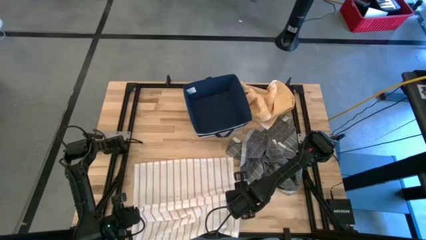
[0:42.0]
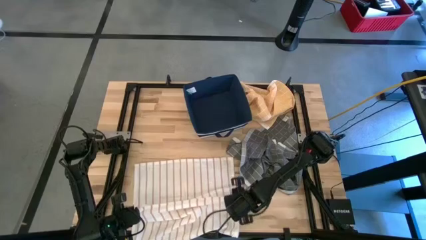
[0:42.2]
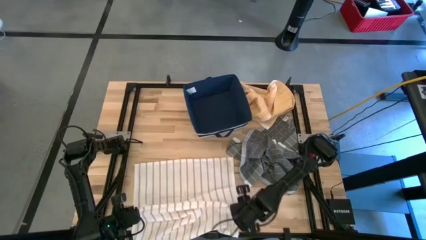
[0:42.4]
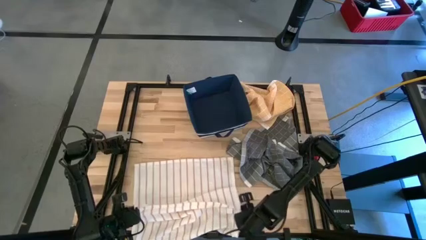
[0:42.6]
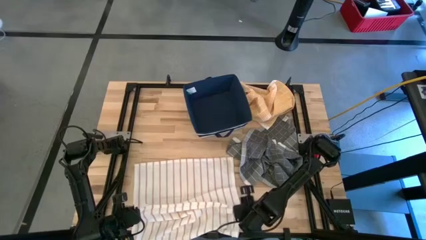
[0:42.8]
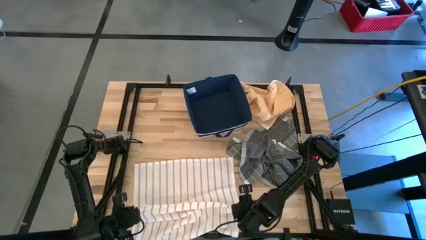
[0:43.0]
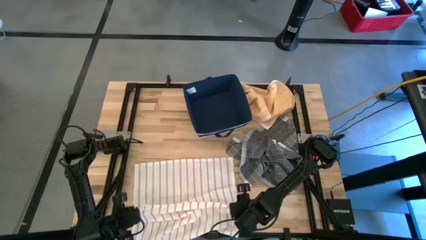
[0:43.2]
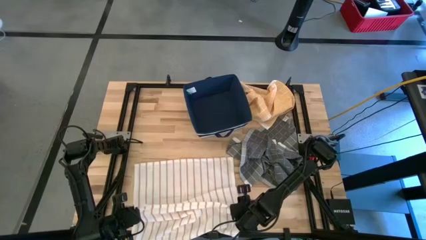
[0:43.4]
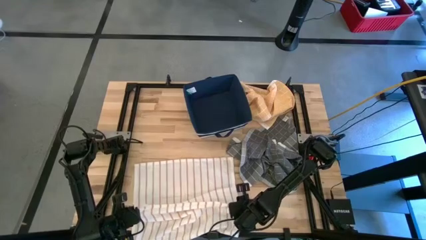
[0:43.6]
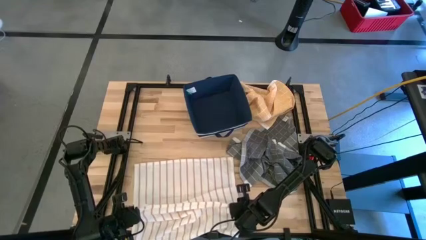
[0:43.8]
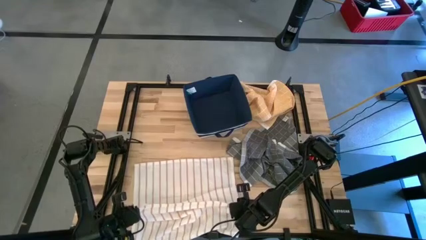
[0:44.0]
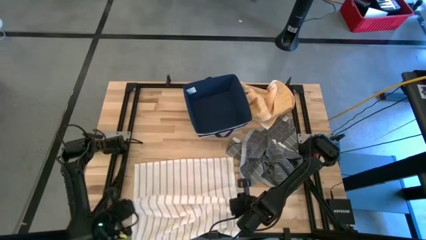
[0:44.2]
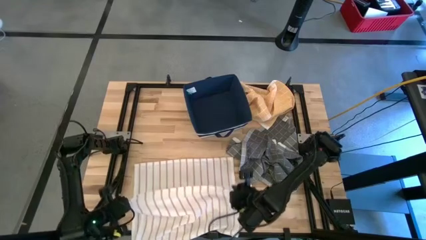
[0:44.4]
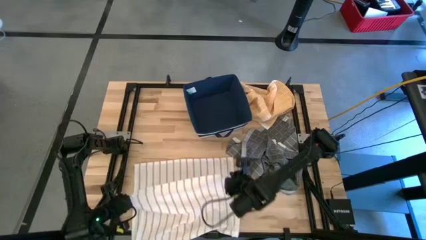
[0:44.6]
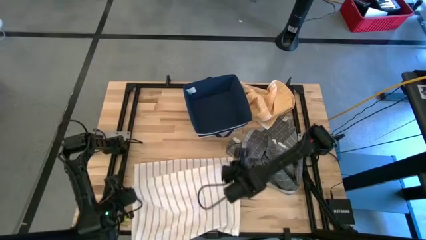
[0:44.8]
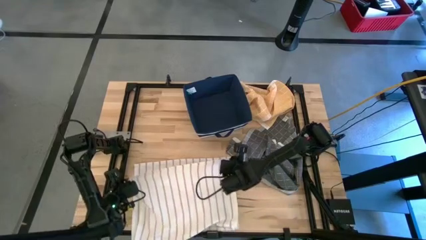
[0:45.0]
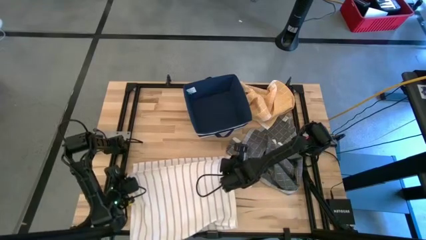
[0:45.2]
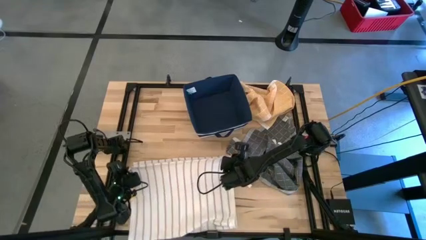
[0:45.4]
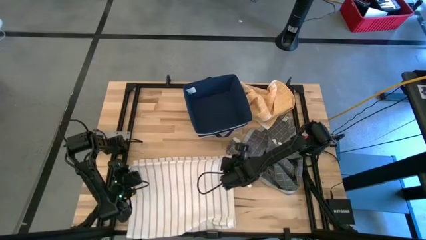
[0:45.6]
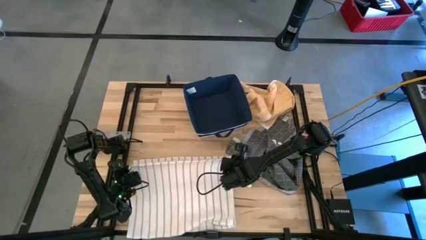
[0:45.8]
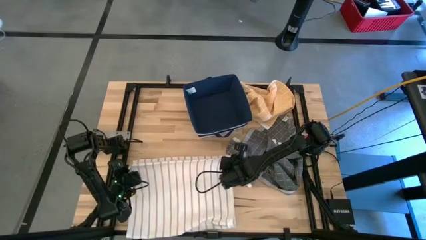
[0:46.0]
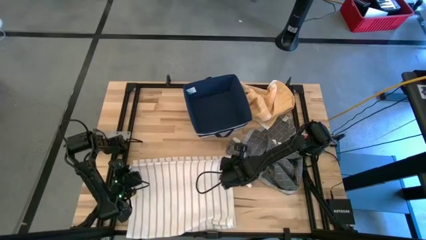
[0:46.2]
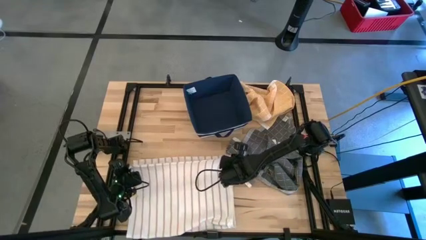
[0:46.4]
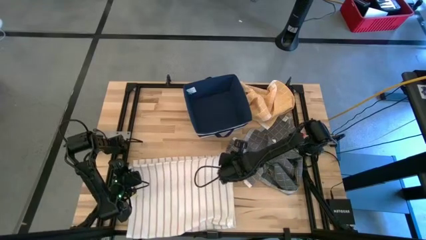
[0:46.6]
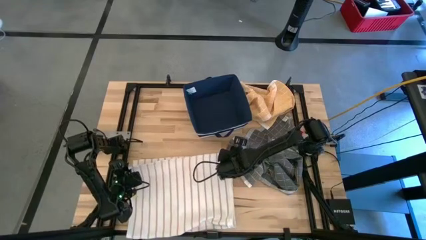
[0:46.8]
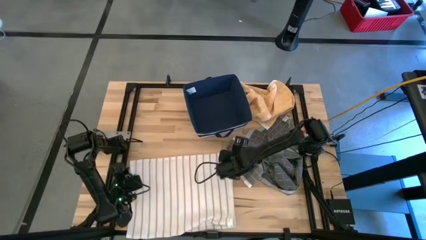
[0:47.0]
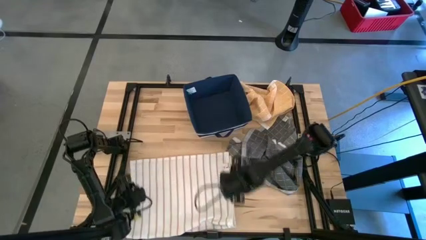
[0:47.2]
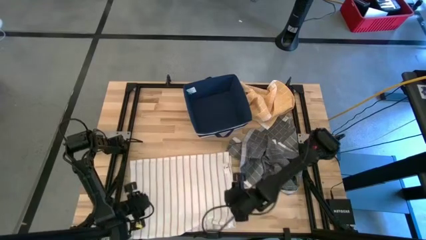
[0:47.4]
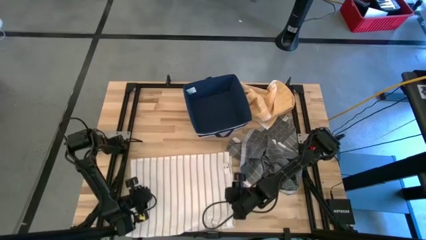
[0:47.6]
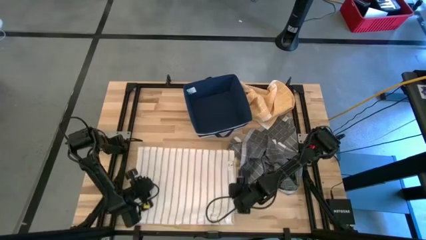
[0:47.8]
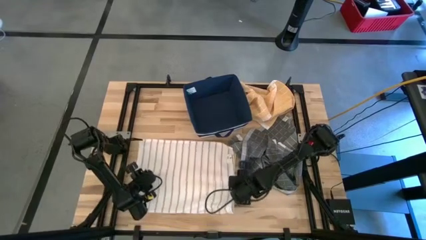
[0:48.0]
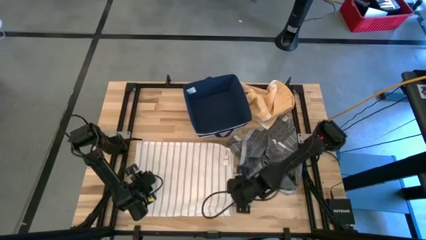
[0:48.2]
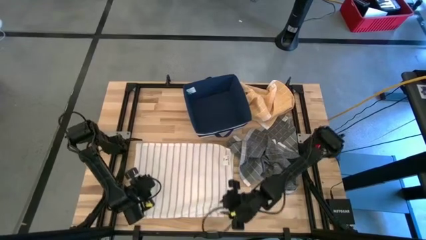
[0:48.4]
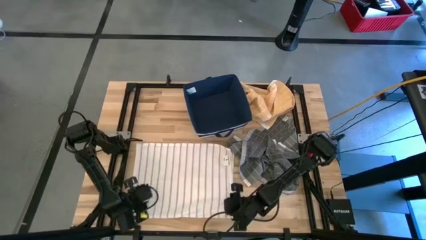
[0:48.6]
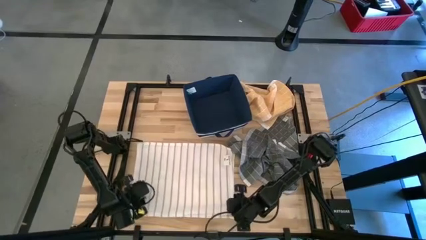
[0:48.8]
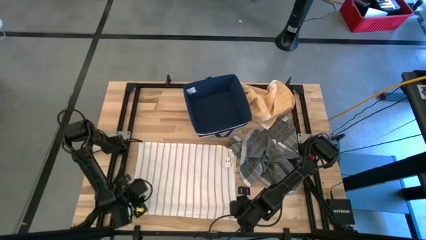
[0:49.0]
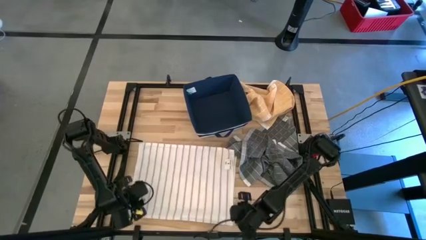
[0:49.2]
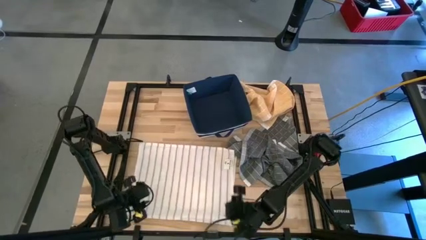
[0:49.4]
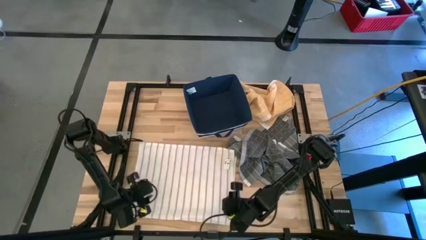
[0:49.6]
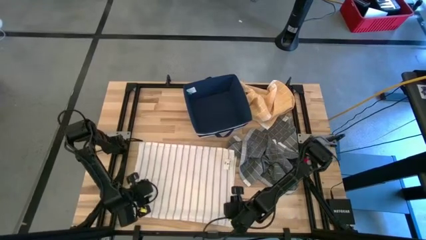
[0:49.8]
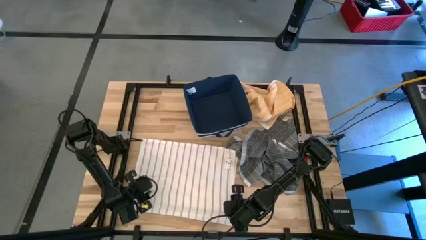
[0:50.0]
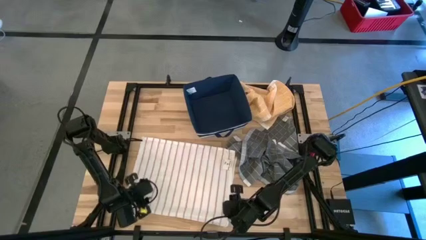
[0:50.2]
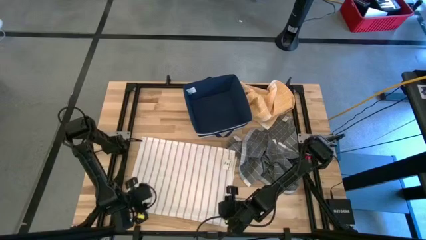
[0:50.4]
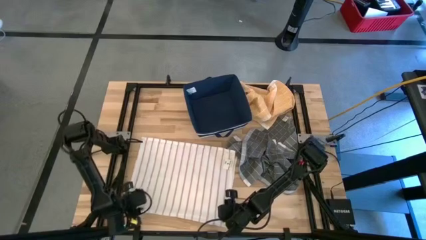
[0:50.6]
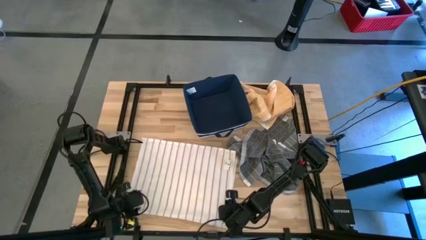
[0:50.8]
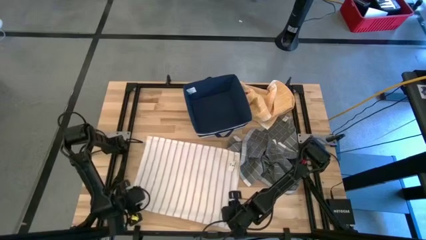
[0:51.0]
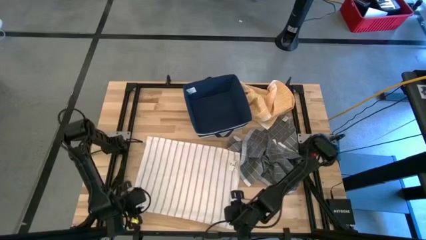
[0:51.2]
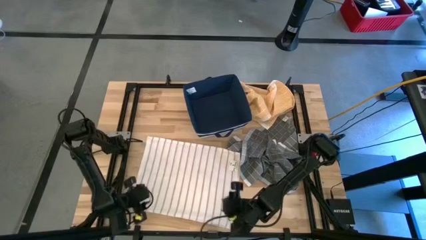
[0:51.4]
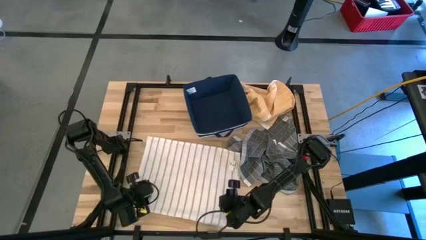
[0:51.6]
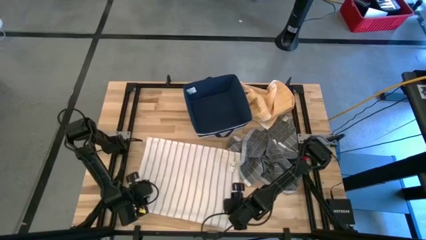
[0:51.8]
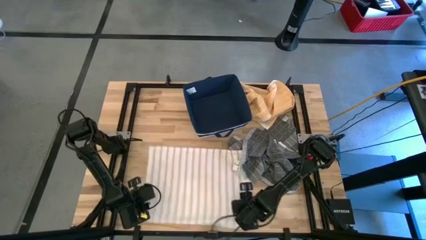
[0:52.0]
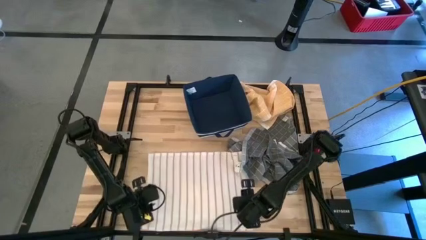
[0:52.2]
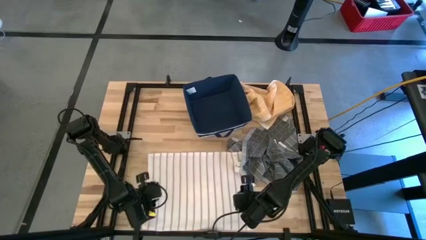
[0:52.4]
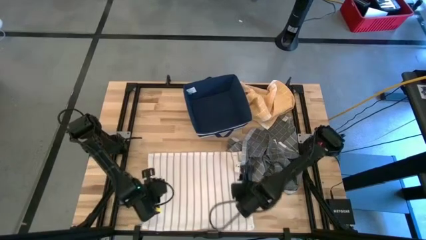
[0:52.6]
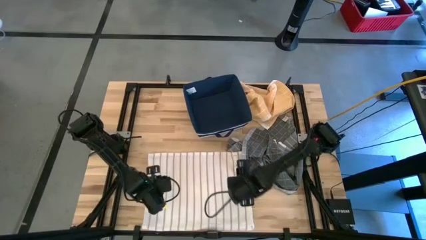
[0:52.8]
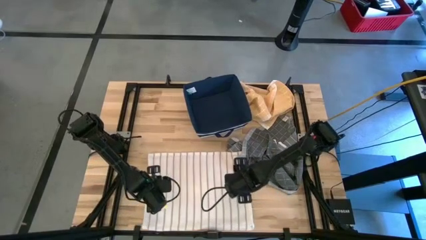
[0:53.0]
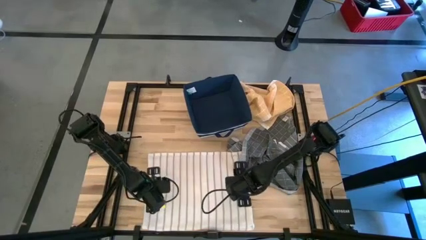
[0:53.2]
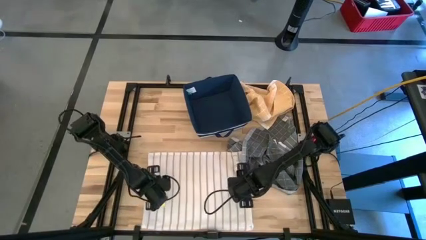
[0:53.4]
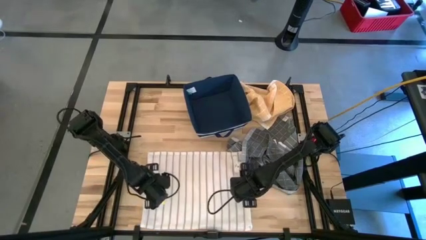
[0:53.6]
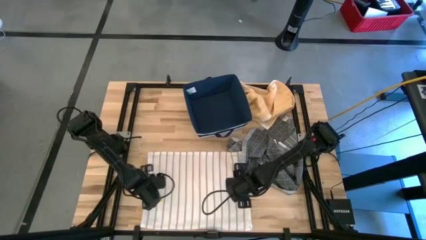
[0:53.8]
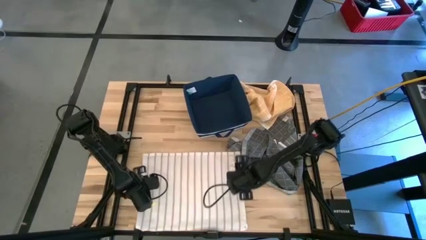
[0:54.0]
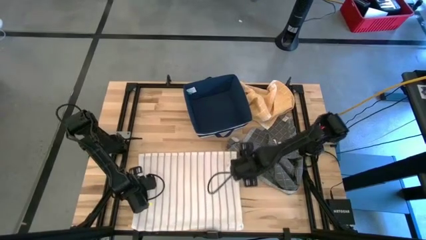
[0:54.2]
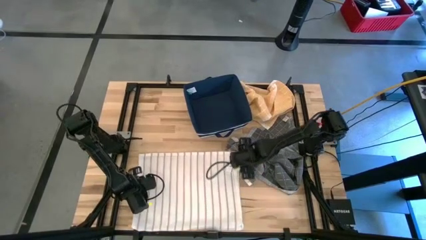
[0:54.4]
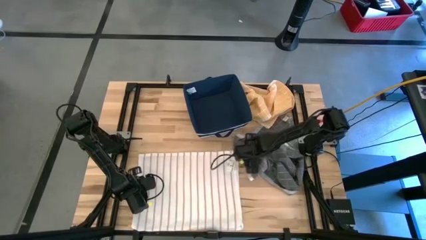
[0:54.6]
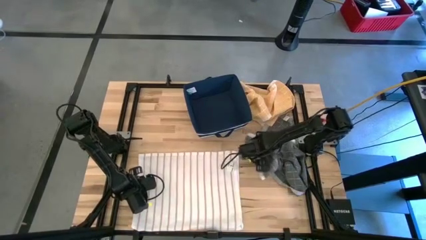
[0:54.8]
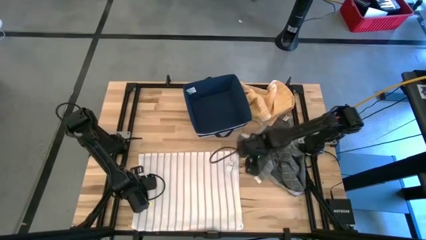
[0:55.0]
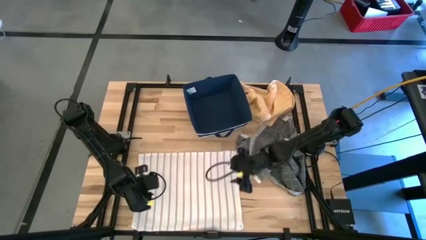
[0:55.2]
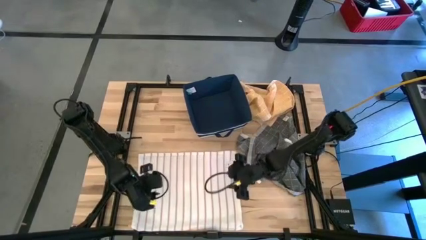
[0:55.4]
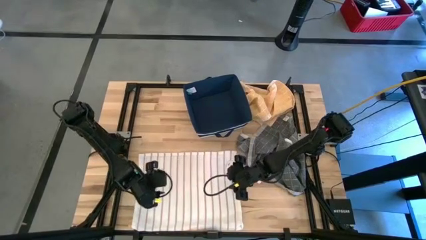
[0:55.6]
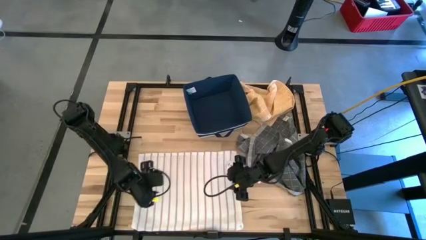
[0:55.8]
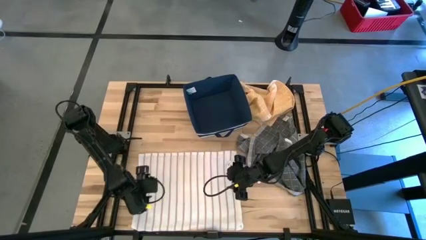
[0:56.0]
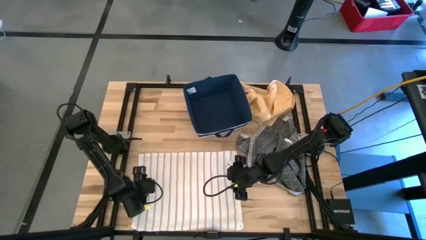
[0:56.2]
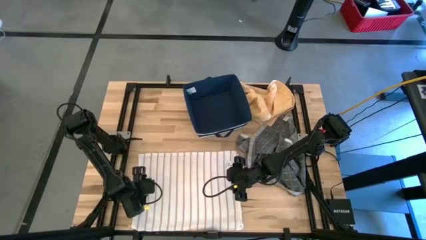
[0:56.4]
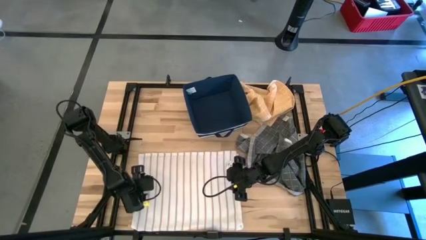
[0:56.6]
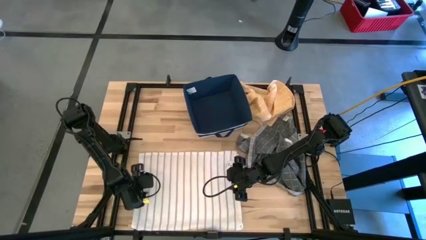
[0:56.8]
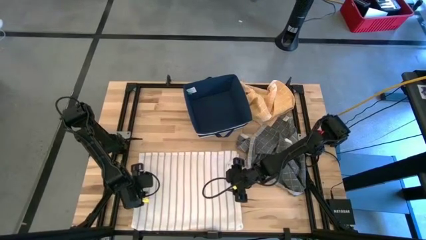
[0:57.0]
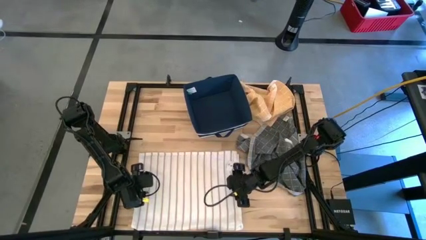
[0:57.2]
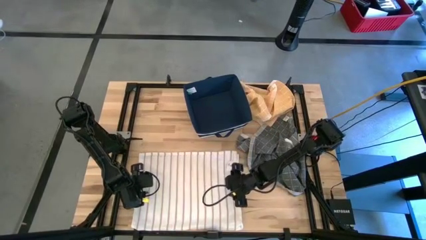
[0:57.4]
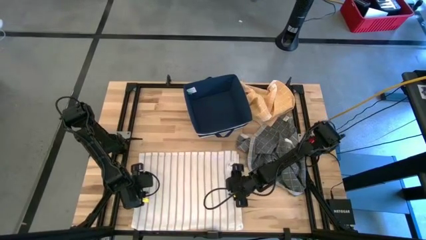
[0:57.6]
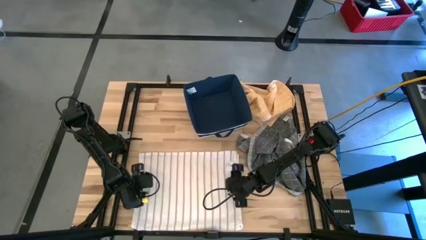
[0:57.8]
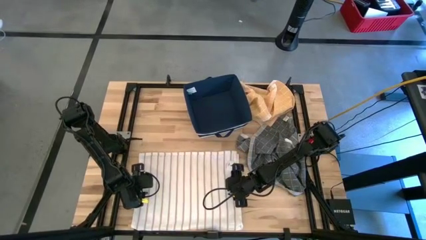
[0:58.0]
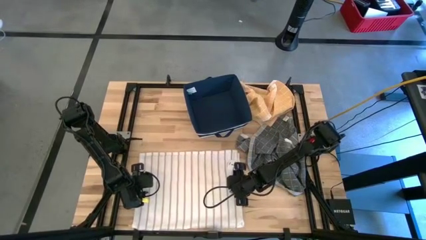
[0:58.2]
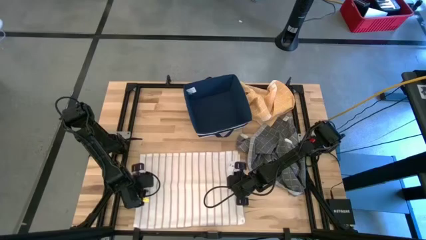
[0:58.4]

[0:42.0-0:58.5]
Task: Fold towel
Fold the white towel
